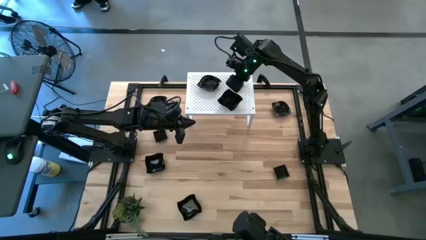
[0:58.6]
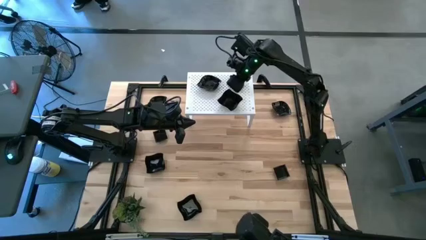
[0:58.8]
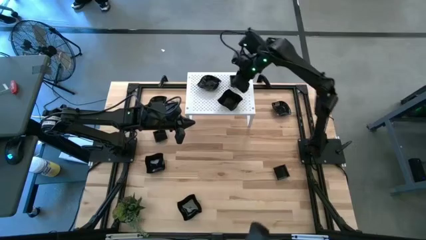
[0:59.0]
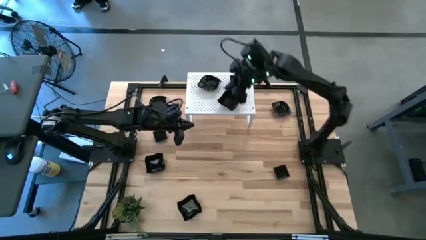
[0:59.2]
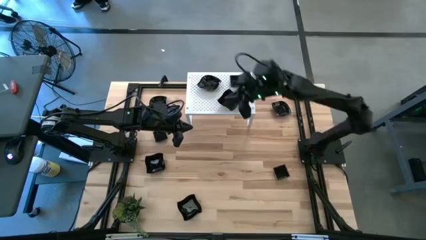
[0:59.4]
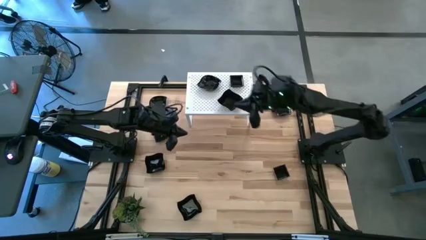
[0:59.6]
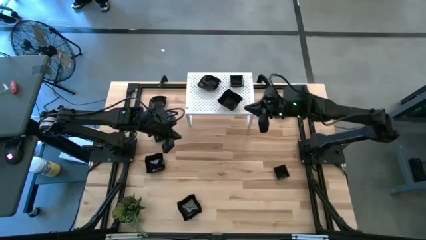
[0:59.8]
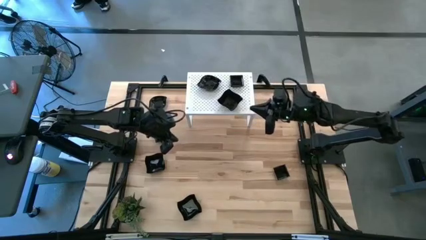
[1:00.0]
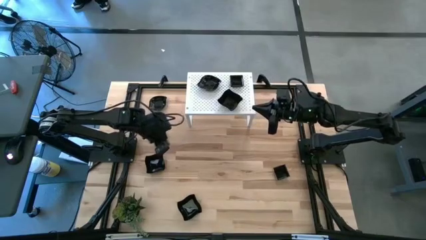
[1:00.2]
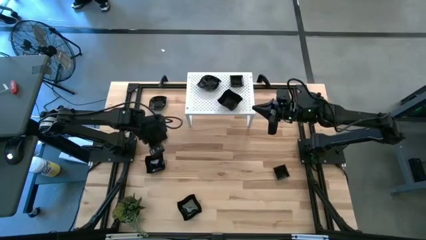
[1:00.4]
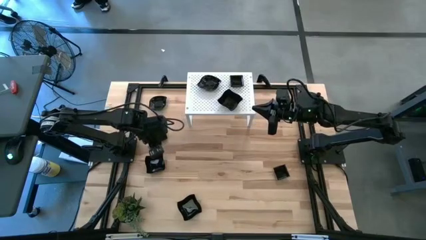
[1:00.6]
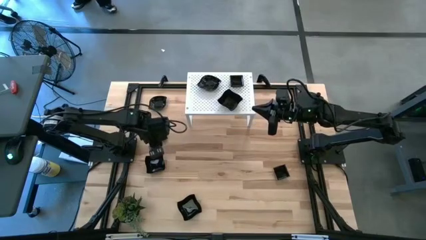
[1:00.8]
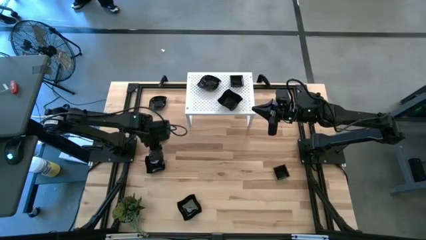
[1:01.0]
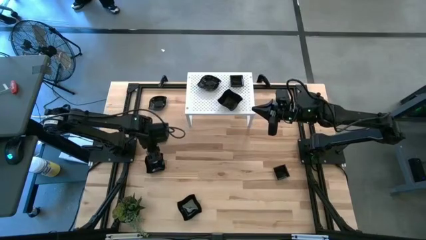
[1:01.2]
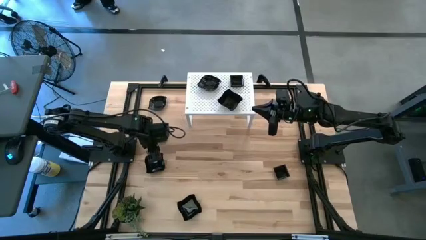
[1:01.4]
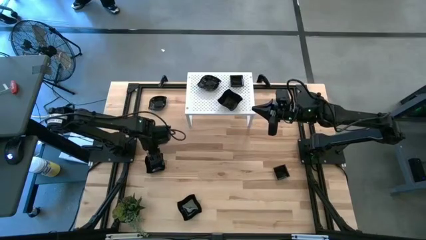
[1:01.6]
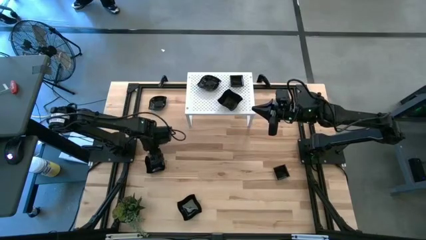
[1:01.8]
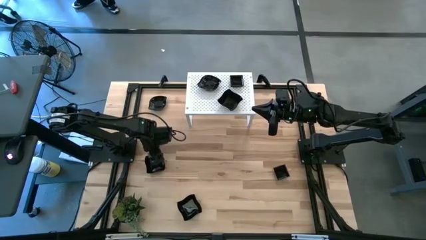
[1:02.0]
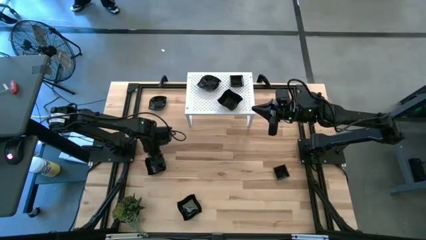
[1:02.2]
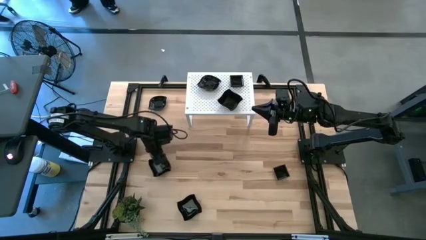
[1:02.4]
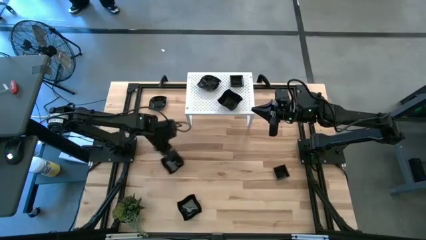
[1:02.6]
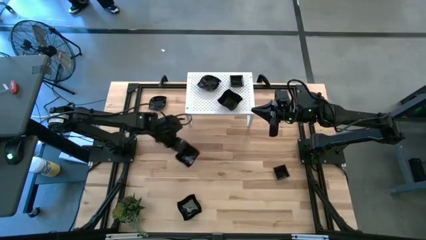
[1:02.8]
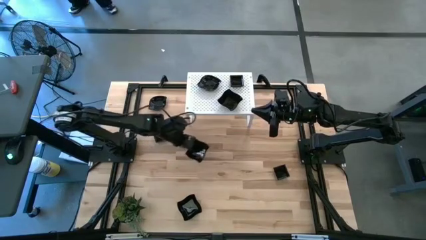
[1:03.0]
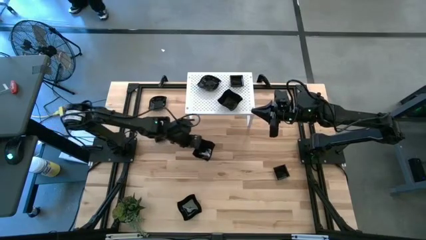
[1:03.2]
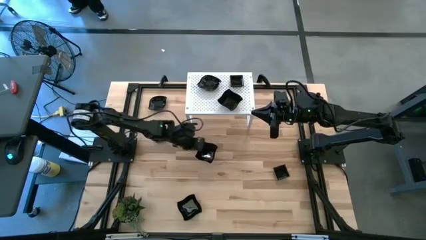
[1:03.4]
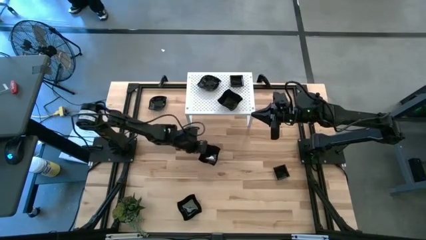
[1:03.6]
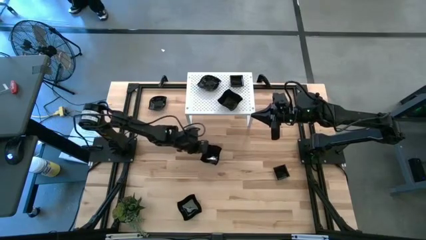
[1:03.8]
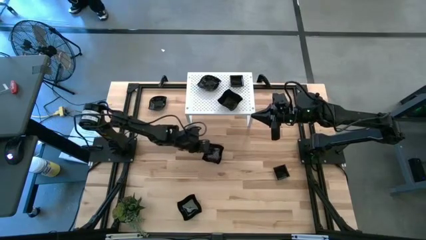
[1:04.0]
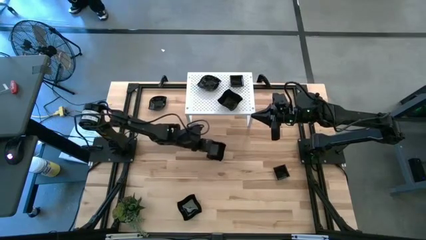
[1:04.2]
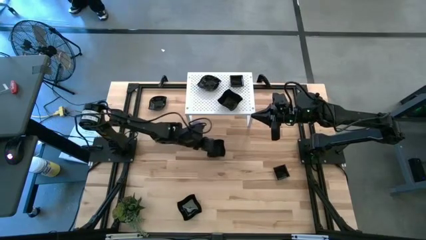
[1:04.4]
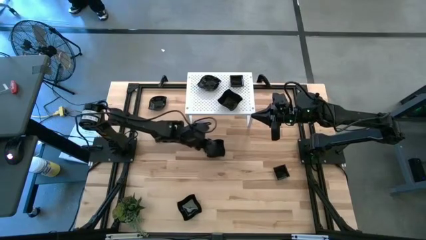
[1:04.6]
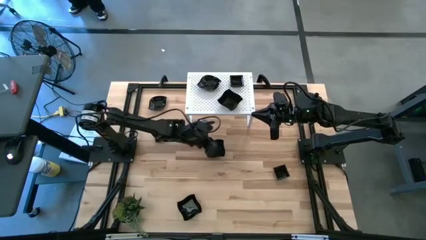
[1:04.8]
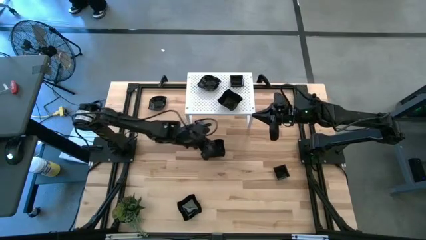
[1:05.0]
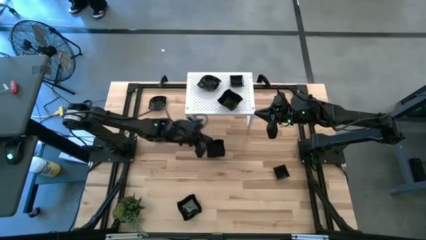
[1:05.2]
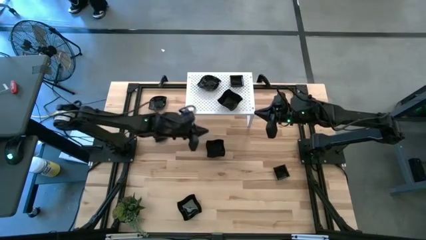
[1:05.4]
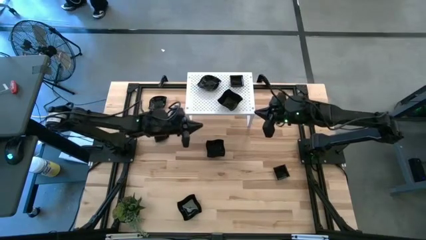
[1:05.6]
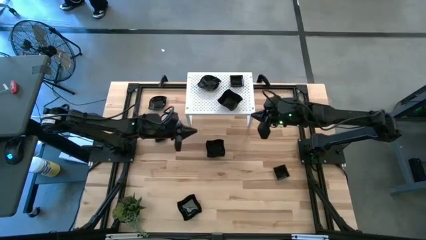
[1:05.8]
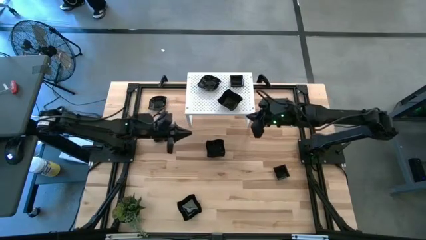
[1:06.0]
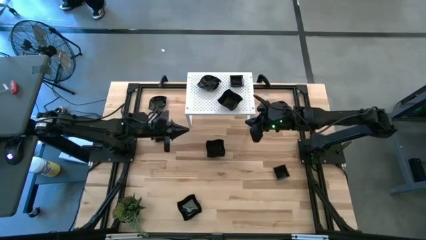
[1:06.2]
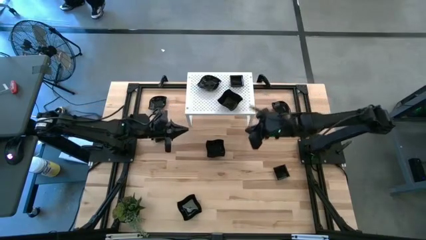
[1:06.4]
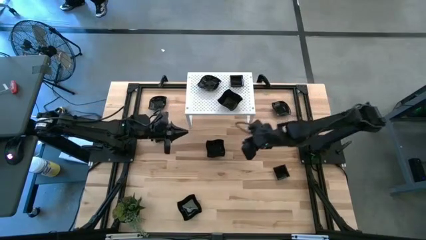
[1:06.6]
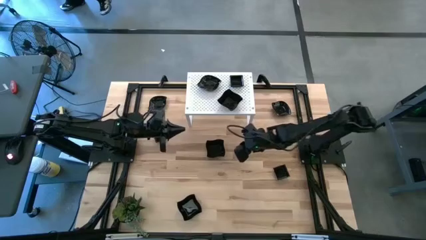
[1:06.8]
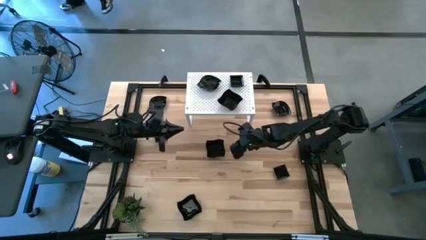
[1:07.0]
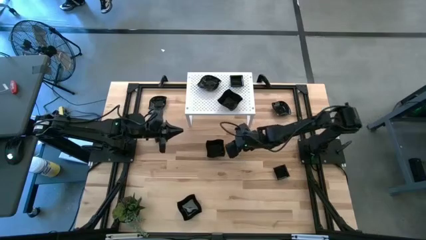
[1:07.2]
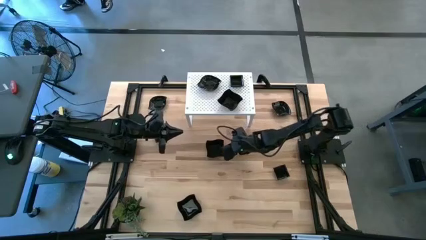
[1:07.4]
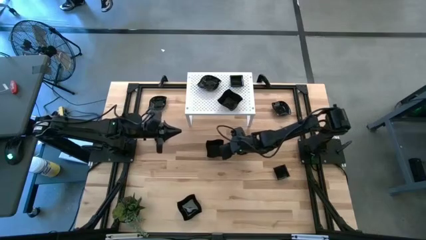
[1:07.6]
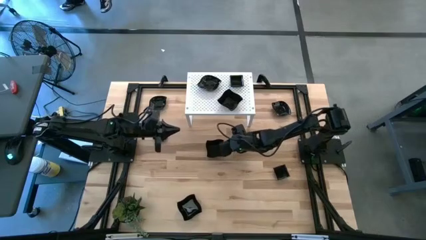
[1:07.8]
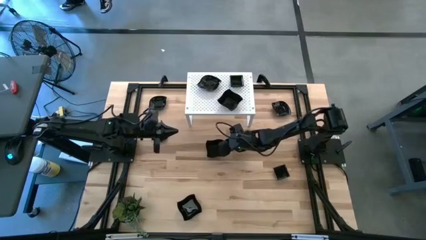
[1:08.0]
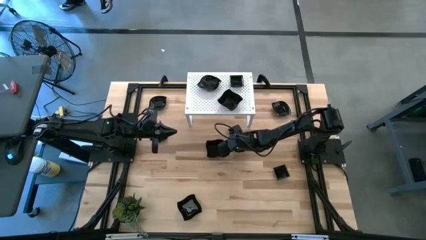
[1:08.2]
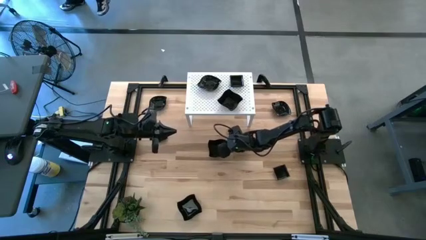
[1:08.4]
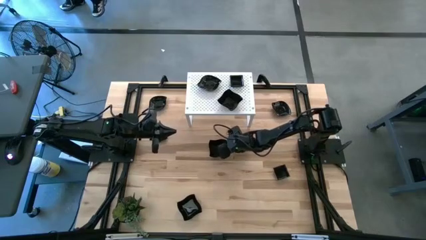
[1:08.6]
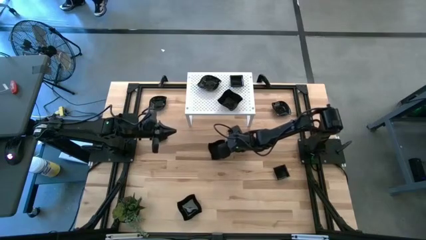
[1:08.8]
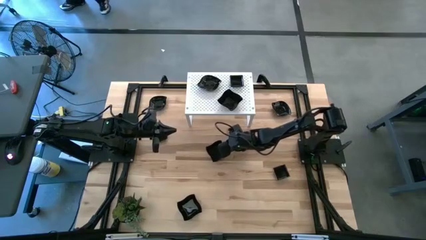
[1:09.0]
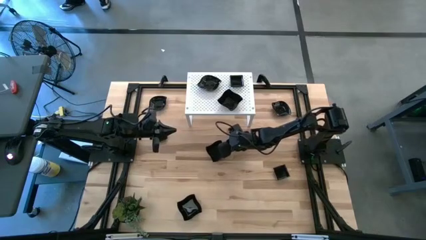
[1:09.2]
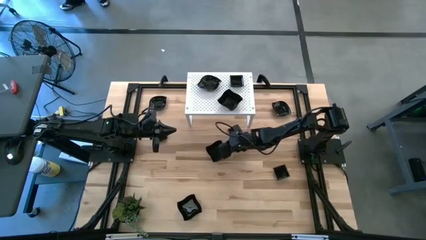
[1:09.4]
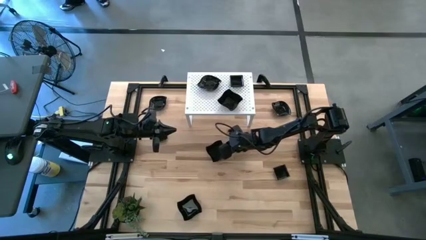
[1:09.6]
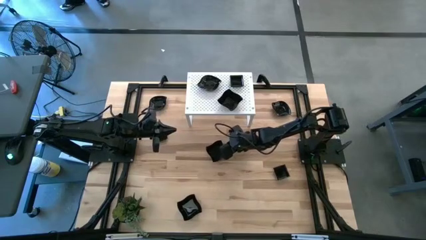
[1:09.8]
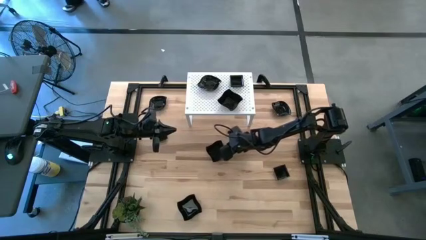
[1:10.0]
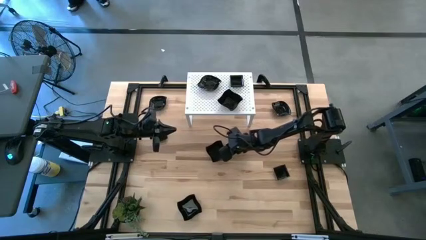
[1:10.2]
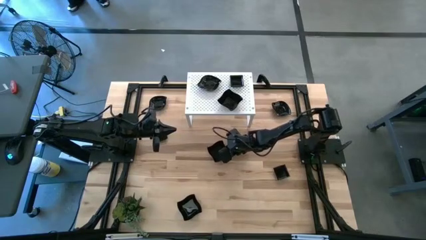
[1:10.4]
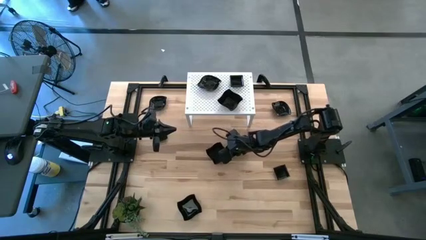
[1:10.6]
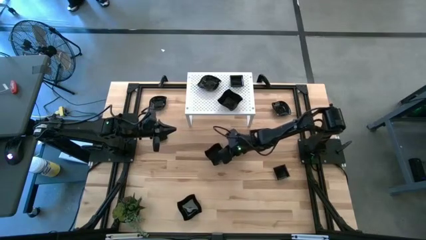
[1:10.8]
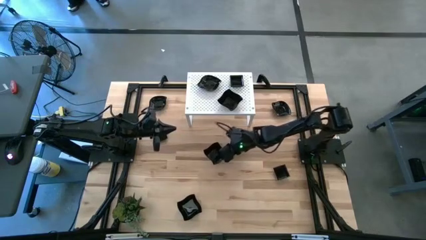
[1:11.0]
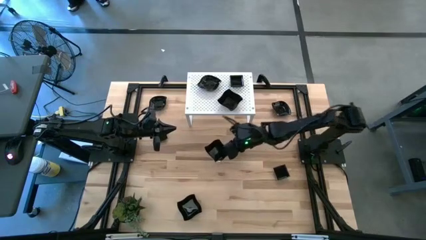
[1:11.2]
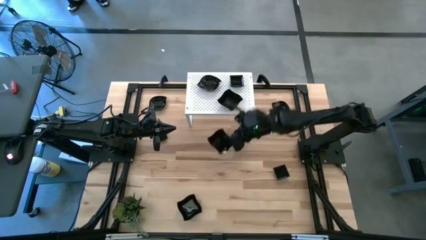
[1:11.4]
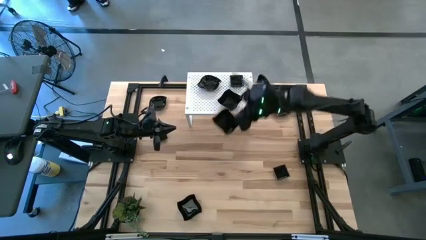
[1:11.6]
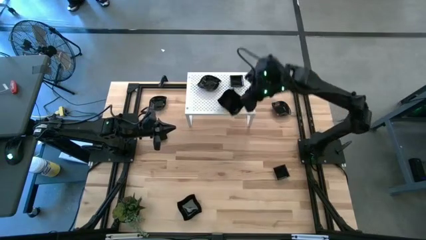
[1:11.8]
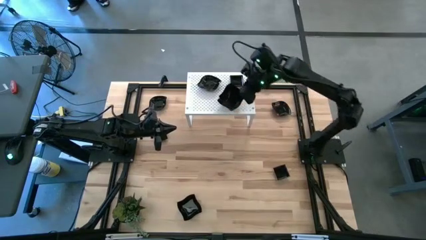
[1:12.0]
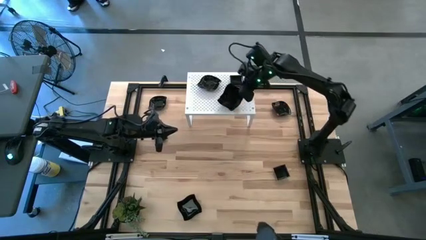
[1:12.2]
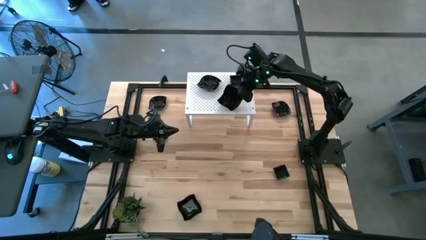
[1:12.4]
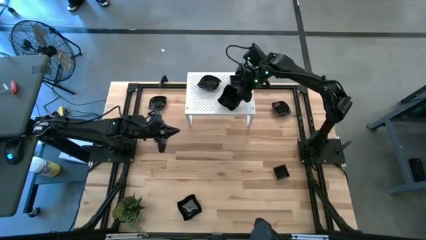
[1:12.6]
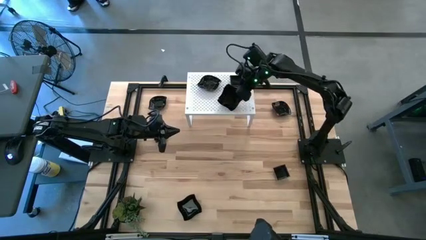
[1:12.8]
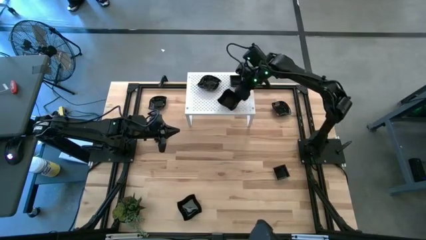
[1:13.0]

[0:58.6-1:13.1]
Task: Pick & Place Mini shaped plates
Stack the distorted square plate on top of the stacked distorted square plate on the shelf

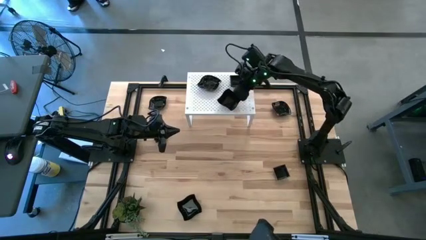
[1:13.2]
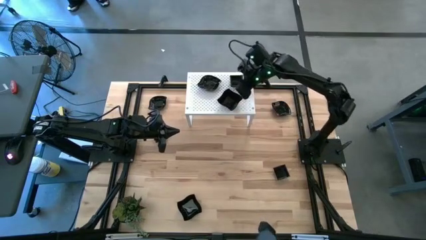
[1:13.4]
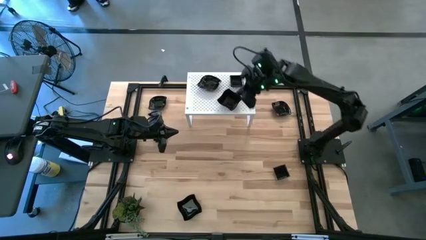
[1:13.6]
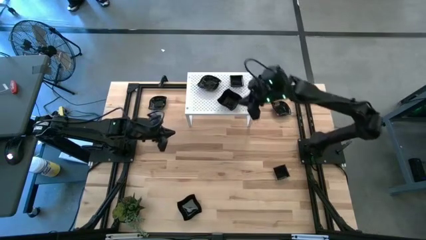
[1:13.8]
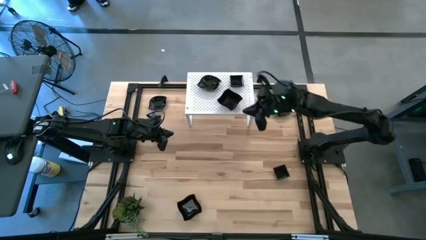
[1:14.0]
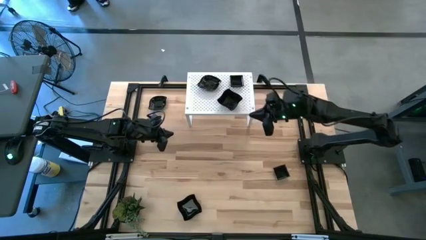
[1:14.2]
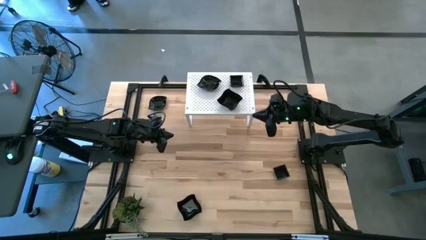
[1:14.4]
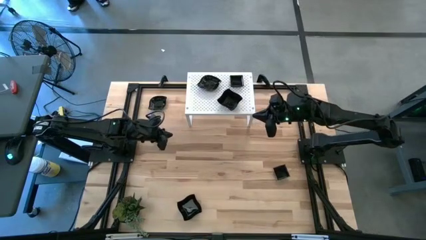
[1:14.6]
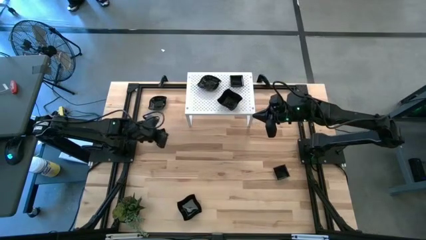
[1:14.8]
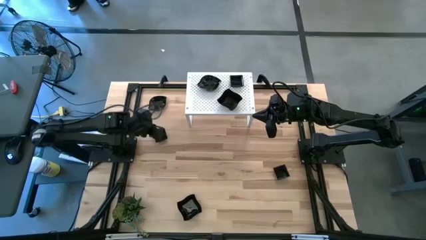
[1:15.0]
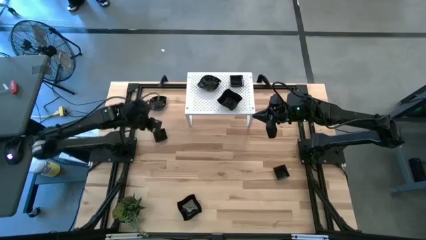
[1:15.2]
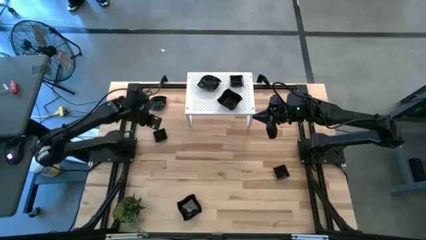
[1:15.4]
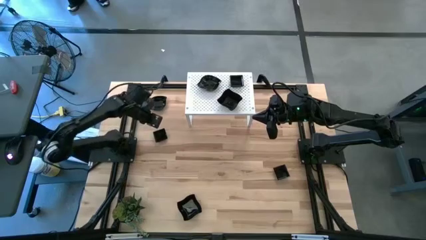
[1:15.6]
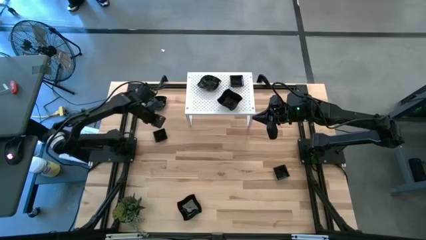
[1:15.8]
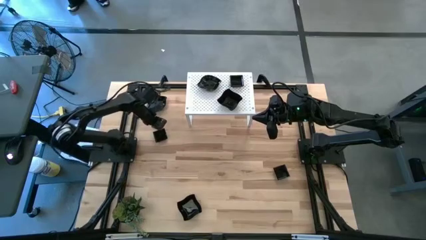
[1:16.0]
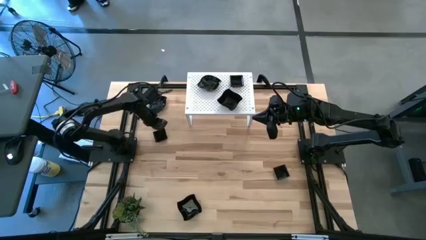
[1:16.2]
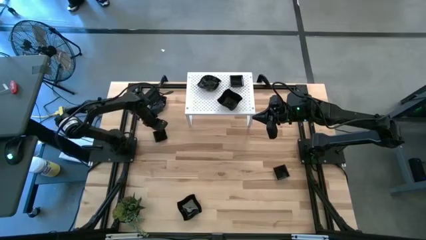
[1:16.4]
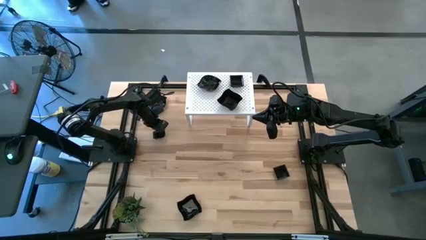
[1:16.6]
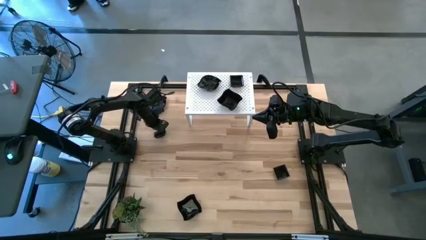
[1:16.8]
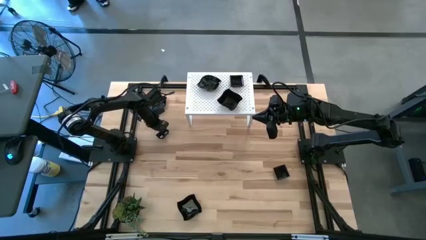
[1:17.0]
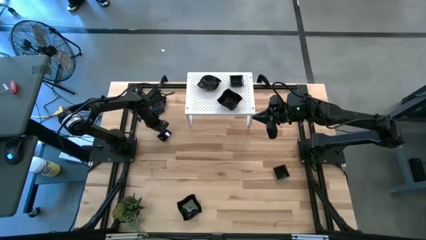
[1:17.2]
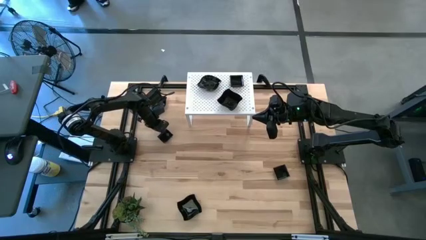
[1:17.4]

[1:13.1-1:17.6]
Stack the square plate on top of the stacked square plate on the shelf
